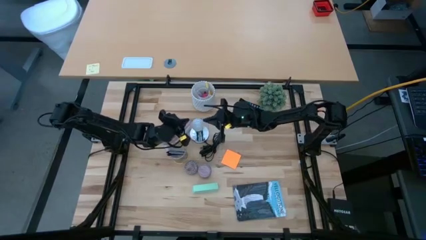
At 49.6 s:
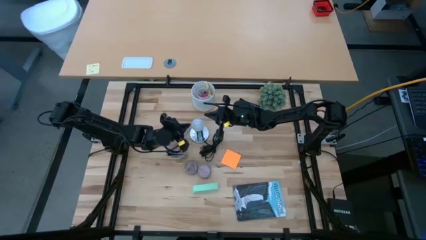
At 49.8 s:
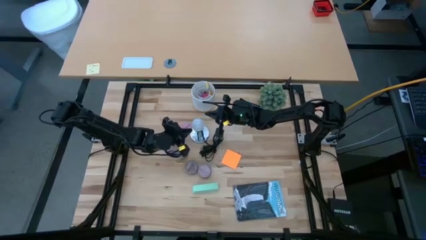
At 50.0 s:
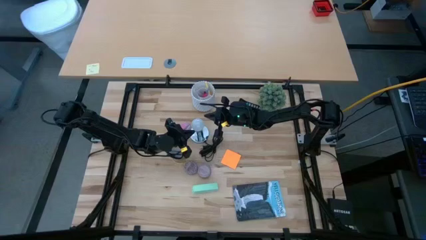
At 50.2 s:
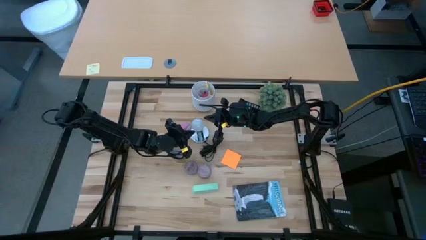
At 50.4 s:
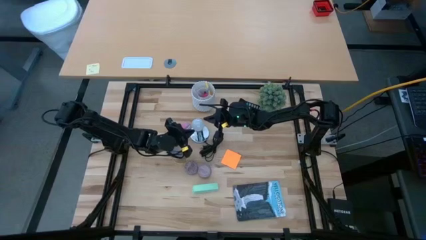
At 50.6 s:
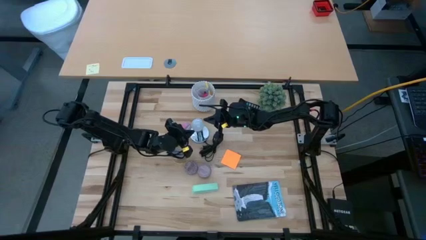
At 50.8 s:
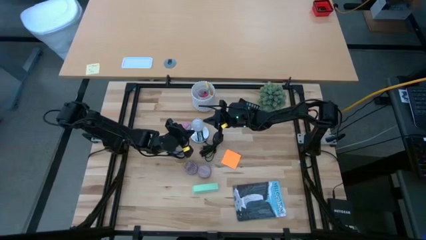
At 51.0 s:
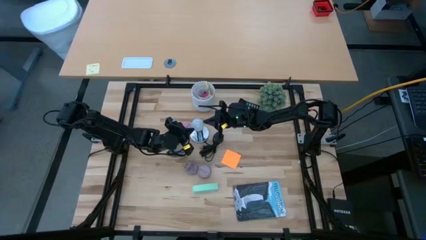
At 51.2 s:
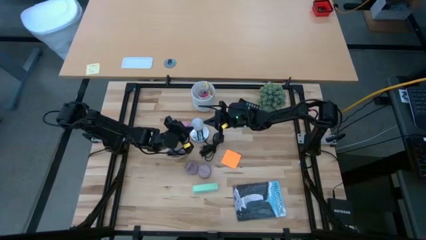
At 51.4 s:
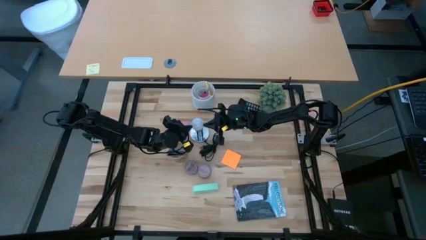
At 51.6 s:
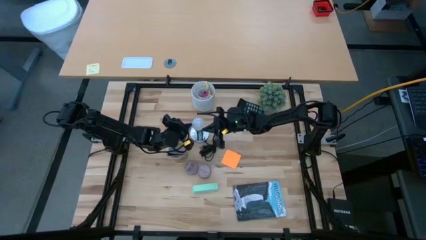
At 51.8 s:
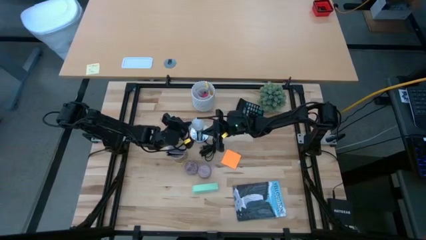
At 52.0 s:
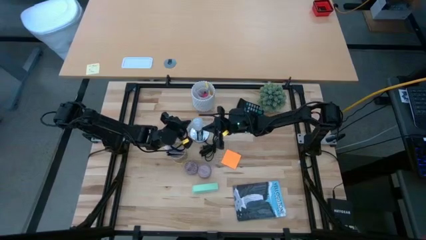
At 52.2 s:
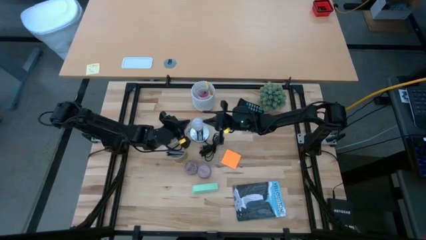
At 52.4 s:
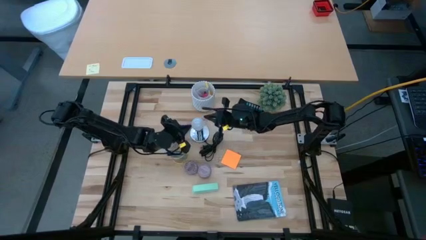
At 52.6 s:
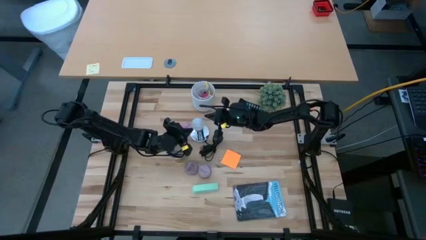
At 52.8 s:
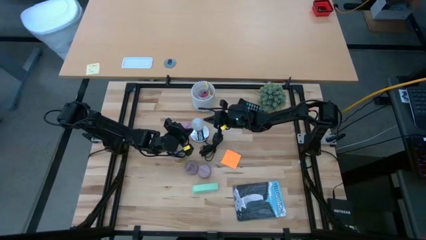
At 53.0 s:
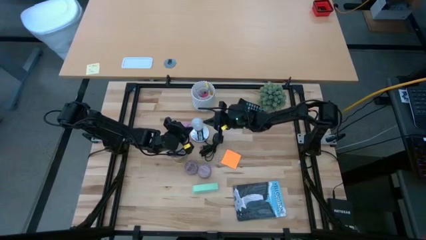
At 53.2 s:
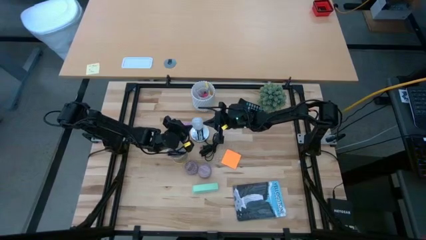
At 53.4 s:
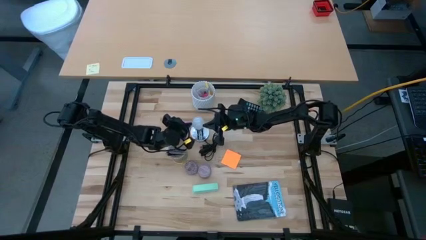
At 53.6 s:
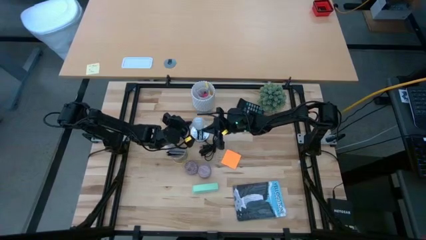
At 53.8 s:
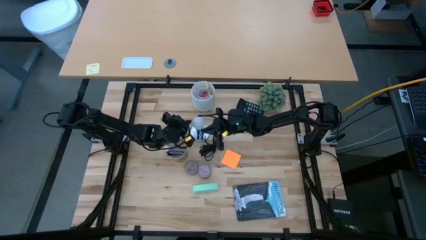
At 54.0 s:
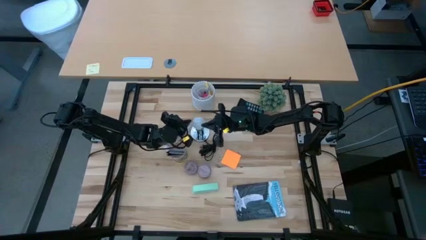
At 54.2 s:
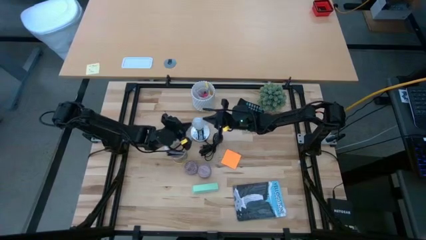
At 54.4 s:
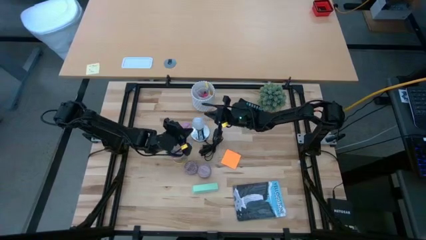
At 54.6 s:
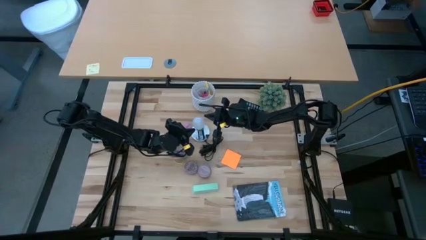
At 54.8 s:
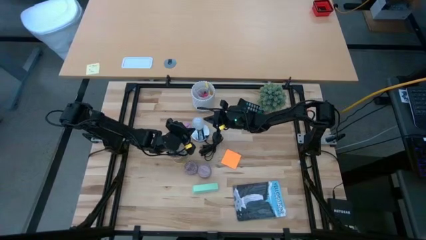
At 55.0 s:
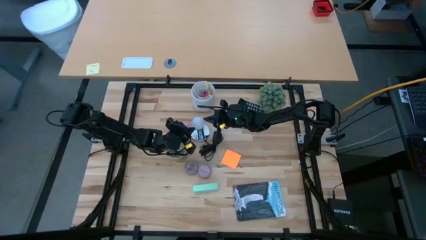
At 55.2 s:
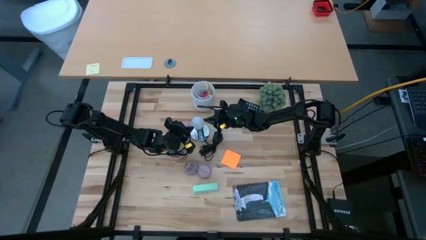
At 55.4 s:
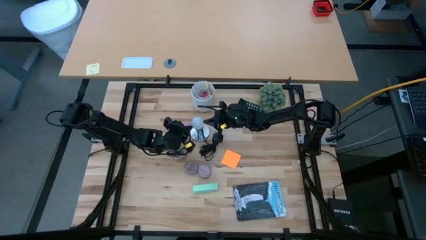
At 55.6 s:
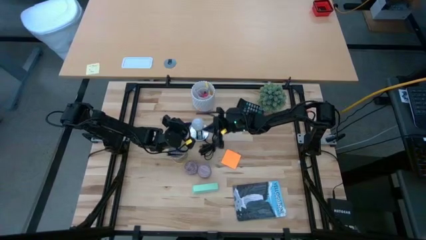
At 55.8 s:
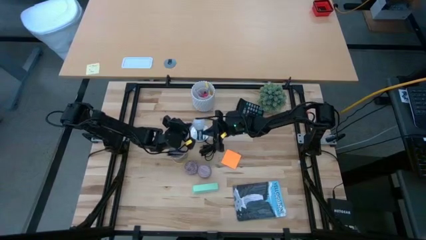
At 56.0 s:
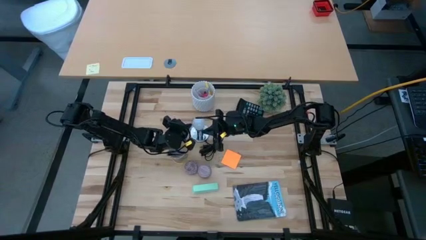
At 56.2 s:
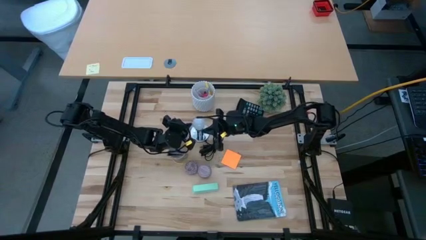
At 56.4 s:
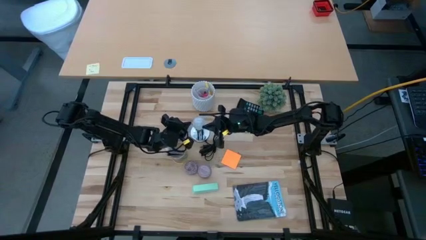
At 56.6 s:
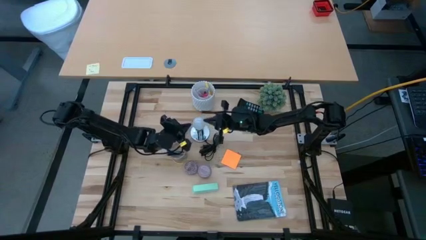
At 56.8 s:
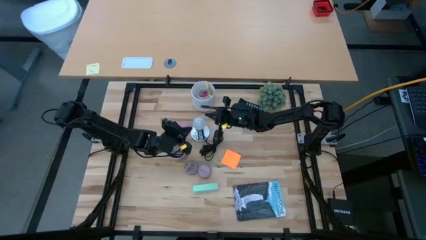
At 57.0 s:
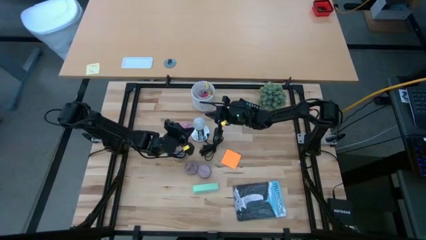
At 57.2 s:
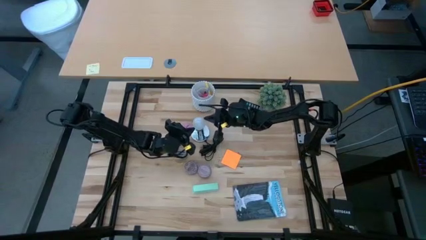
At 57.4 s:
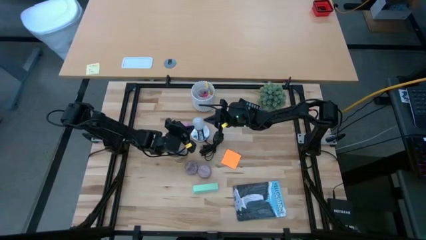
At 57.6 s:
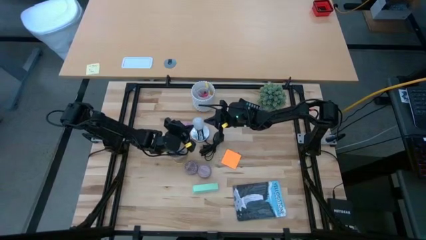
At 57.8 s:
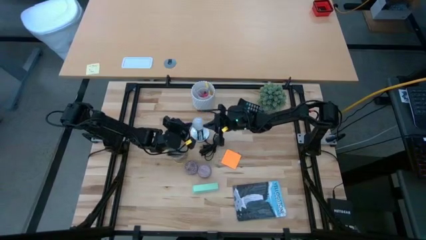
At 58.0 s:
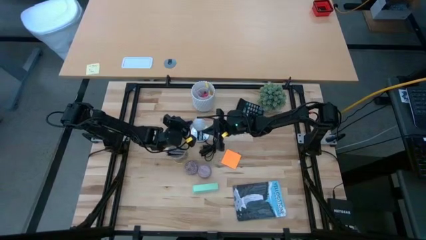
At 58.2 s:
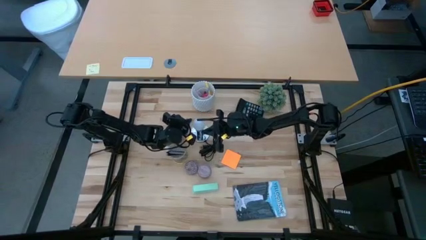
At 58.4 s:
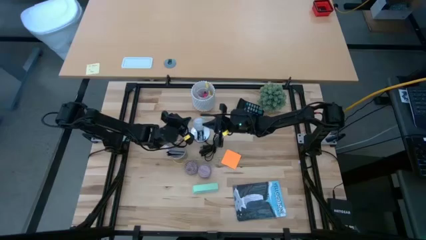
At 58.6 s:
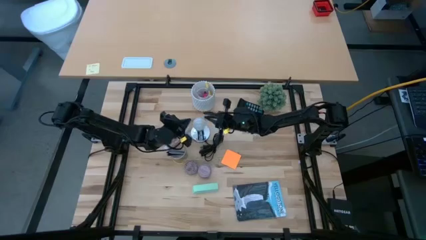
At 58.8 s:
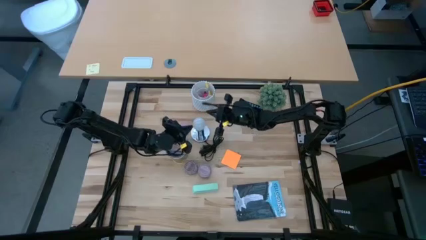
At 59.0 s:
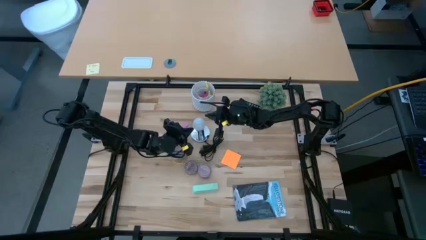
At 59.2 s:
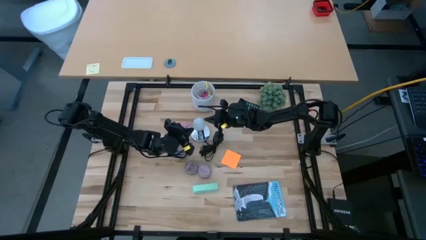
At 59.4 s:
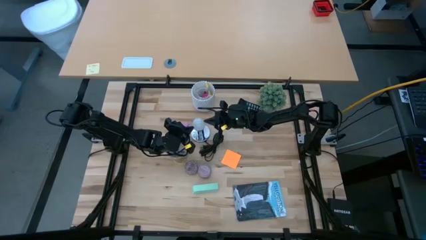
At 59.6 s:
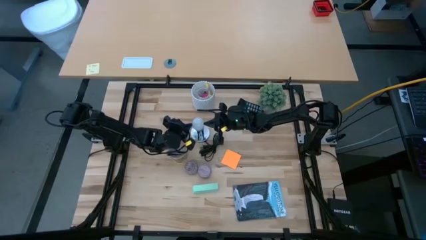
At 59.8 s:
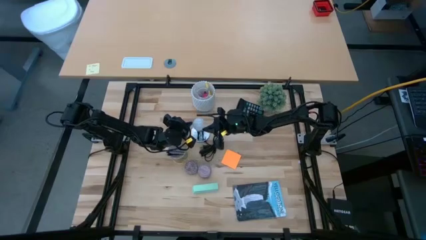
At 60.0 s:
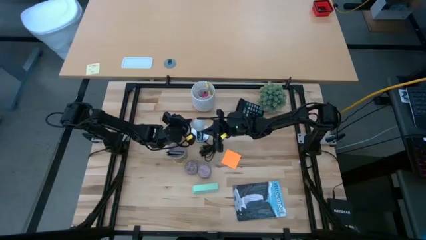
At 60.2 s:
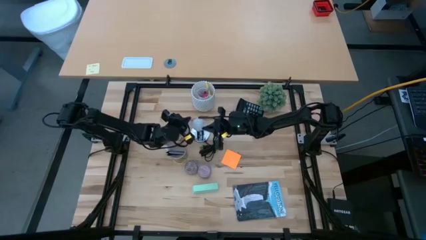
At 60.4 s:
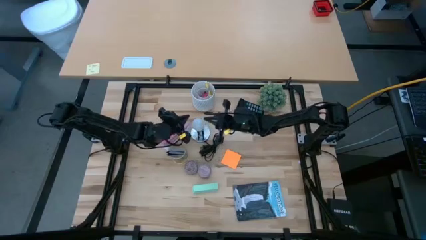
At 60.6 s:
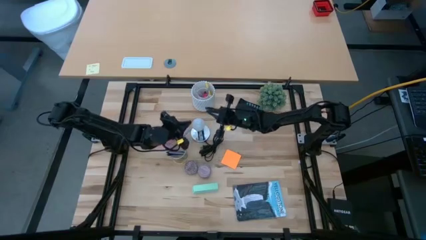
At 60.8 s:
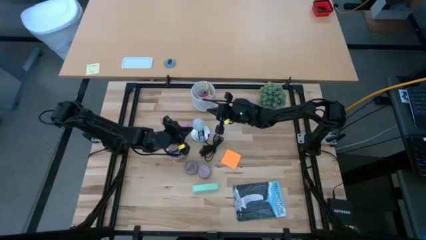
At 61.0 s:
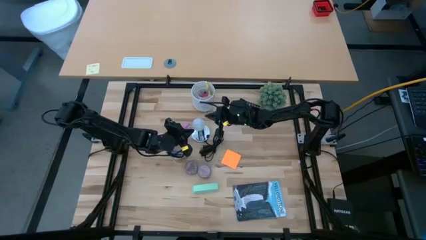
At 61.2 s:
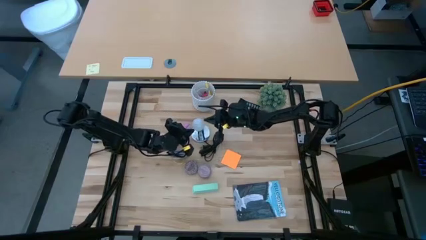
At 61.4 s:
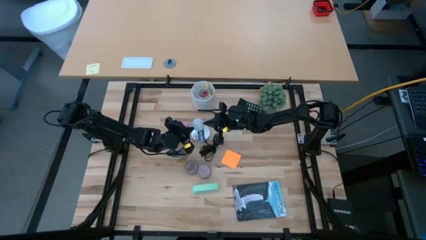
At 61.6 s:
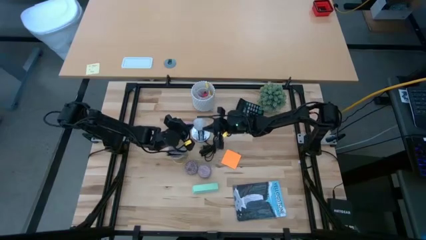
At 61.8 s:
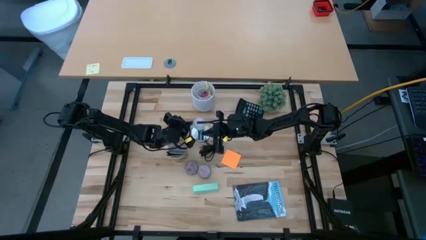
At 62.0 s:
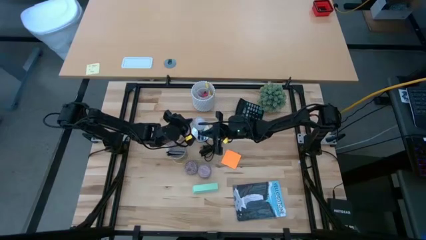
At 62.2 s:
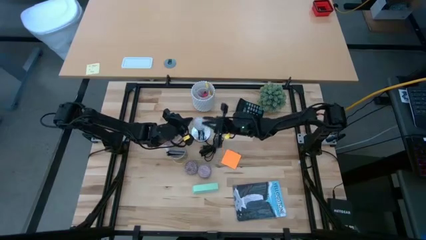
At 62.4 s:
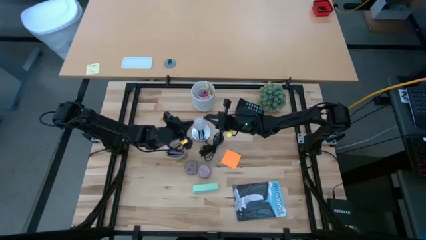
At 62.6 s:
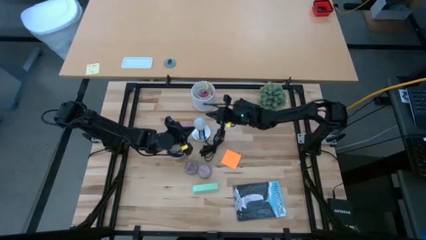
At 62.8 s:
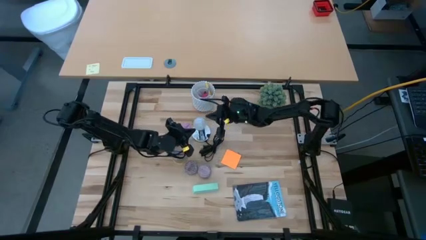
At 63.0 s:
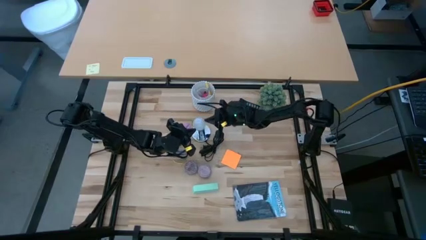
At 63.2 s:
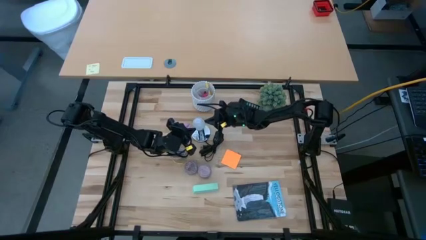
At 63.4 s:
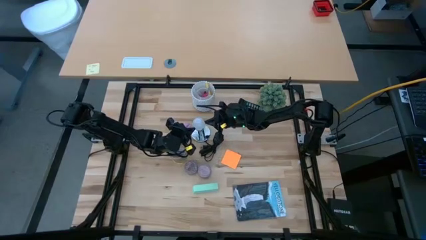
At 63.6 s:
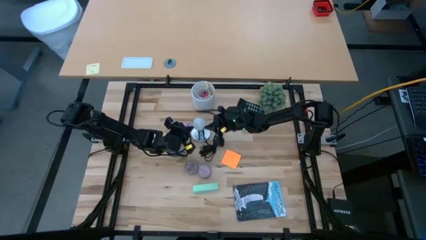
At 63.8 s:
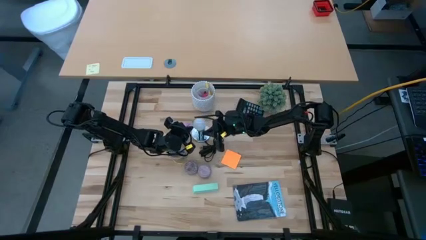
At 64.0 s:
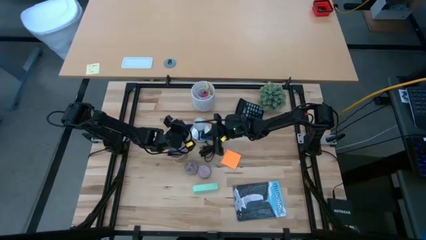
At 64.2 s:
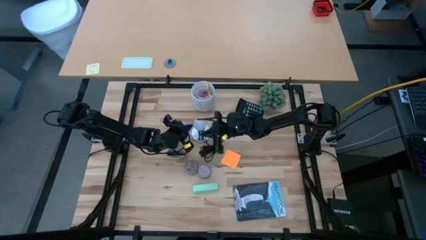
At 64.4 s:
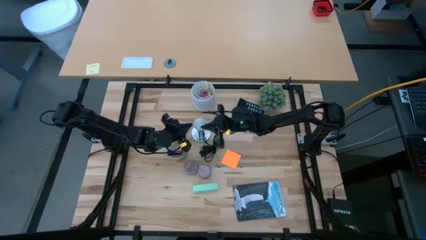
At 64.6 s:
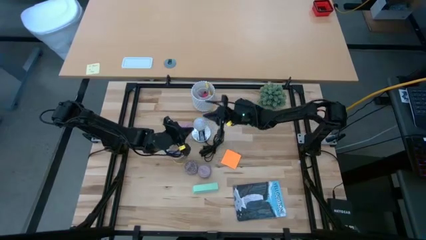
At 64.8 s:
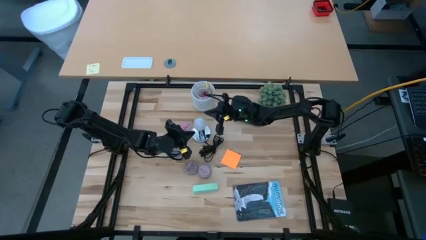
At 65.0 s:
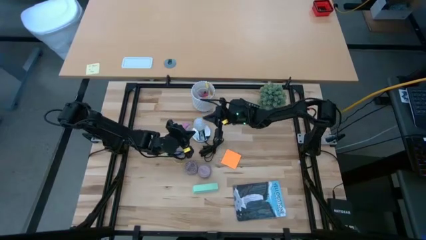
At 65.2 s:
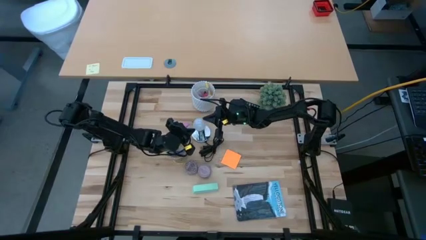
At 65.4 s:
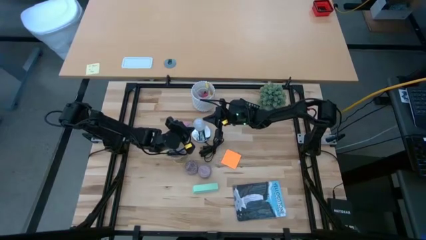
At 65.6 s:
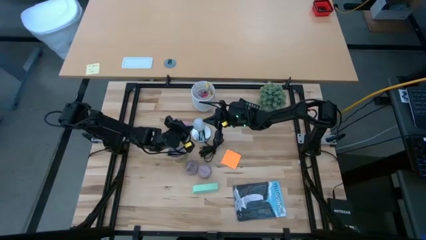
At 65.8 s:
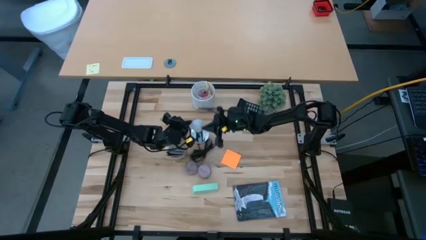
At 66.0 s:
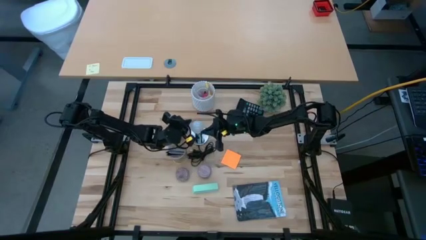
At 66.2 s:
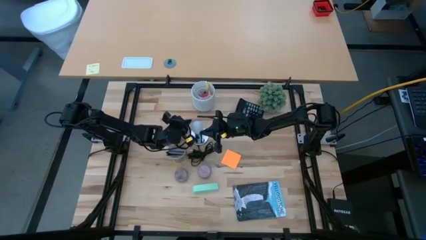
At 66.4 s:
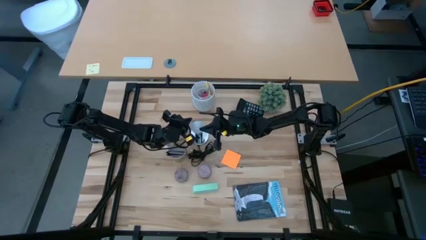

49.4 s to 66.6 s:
Task: Screw lightbulb
Insert the white lightbulb into the silver lamp
